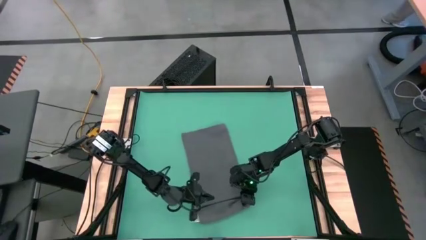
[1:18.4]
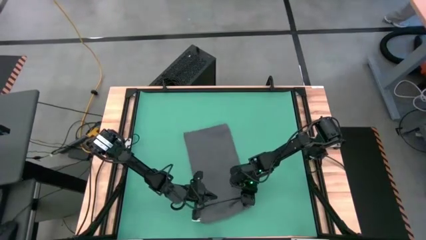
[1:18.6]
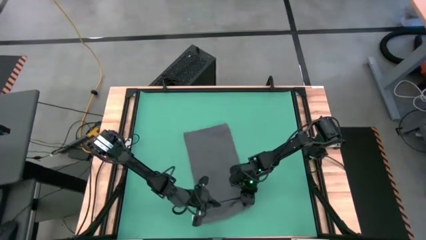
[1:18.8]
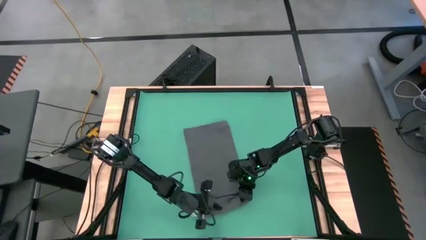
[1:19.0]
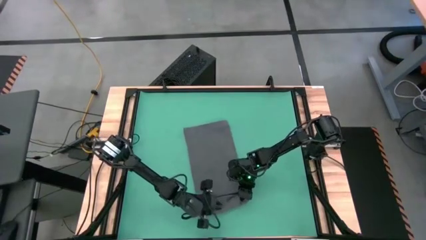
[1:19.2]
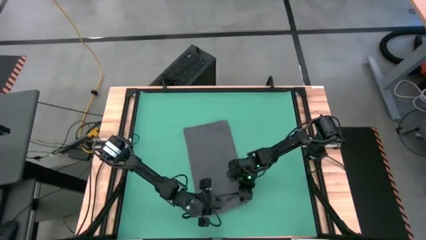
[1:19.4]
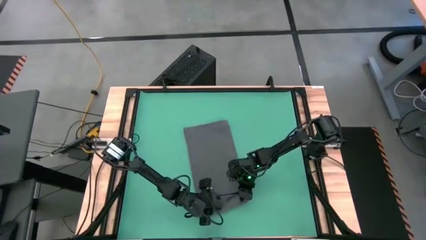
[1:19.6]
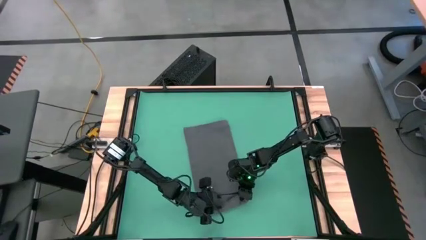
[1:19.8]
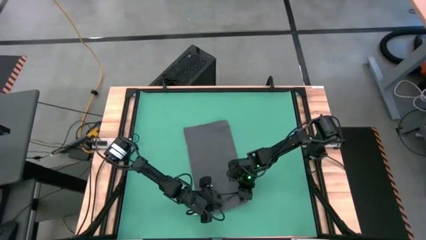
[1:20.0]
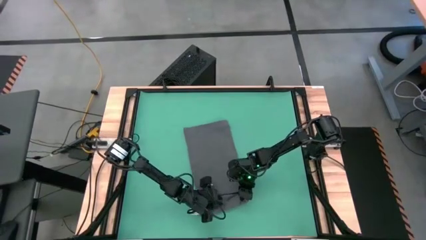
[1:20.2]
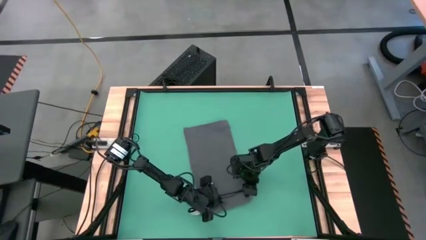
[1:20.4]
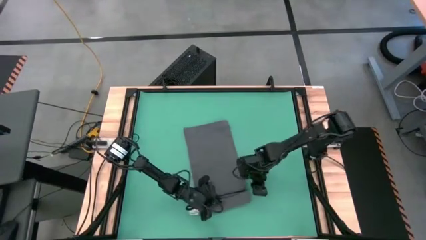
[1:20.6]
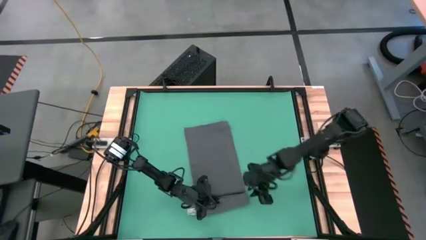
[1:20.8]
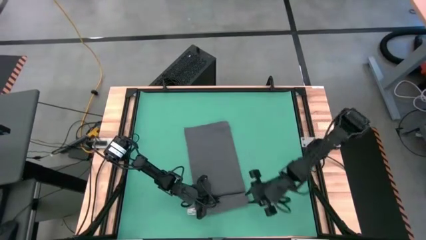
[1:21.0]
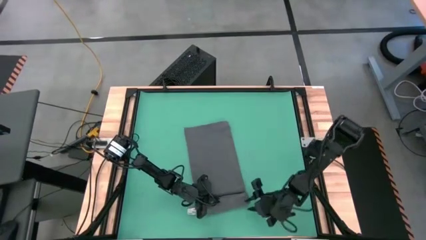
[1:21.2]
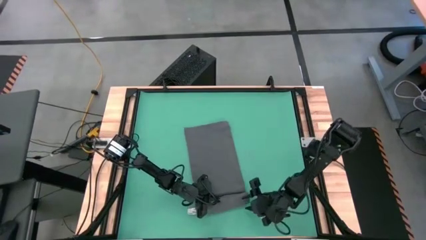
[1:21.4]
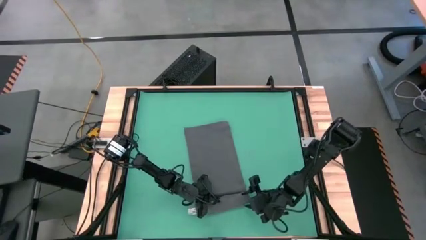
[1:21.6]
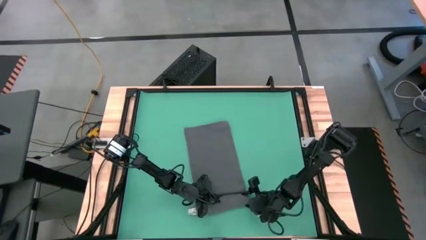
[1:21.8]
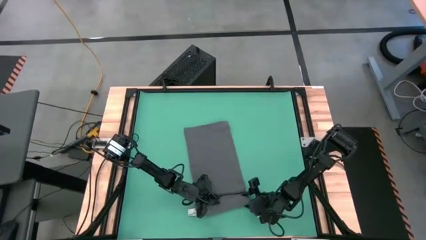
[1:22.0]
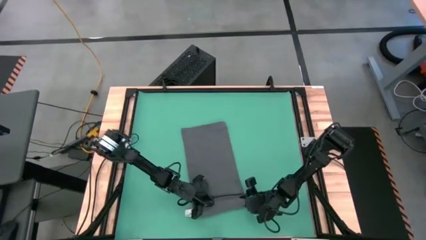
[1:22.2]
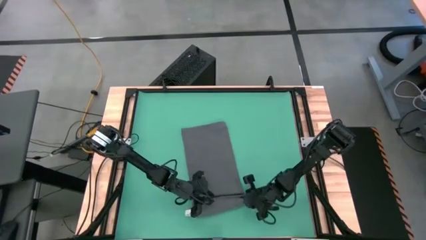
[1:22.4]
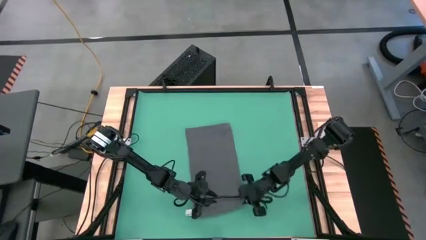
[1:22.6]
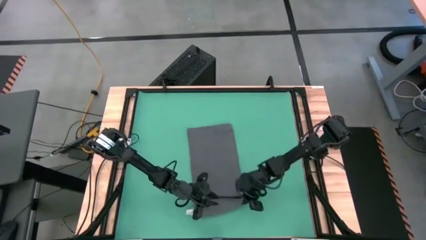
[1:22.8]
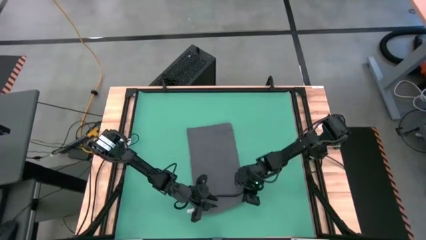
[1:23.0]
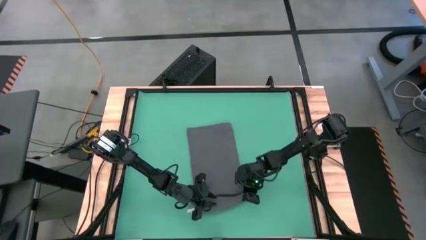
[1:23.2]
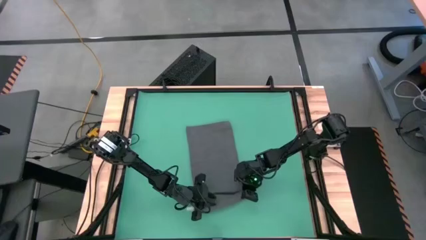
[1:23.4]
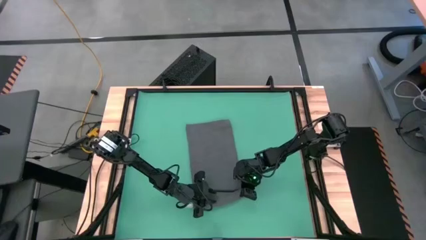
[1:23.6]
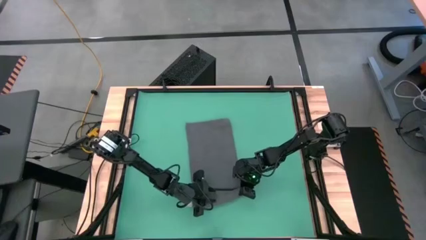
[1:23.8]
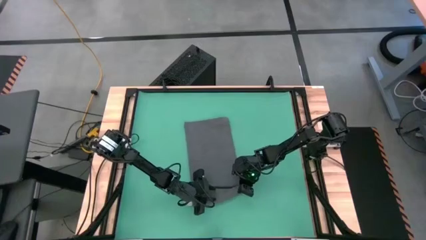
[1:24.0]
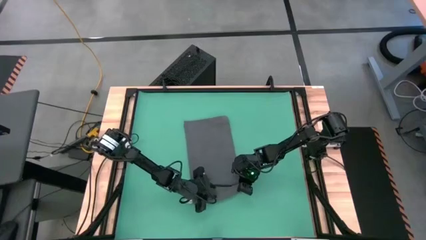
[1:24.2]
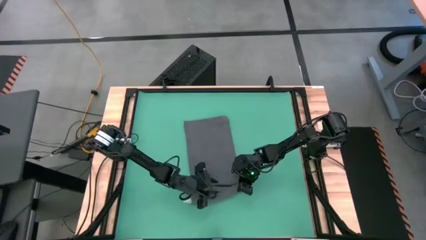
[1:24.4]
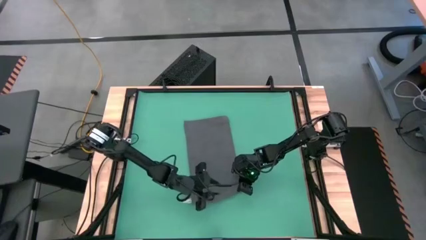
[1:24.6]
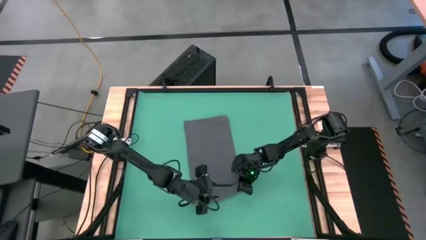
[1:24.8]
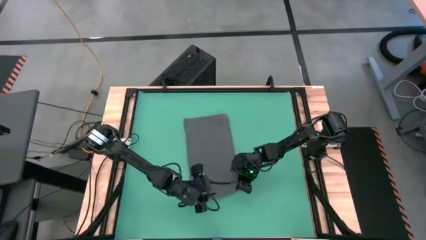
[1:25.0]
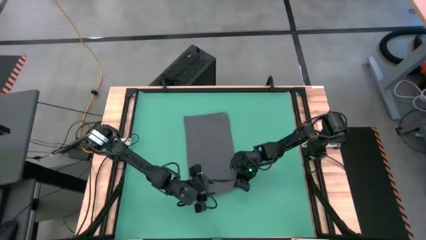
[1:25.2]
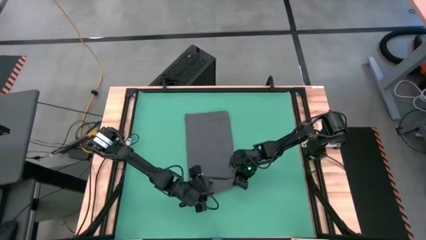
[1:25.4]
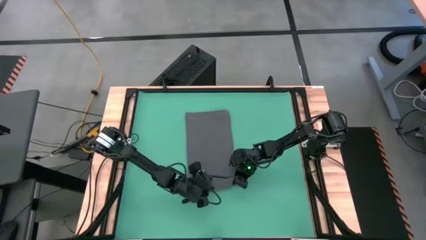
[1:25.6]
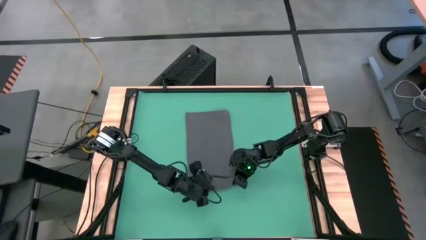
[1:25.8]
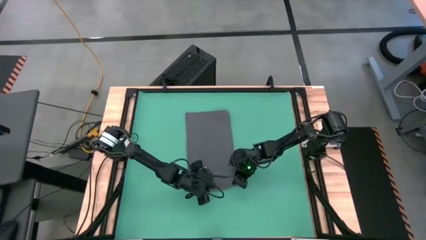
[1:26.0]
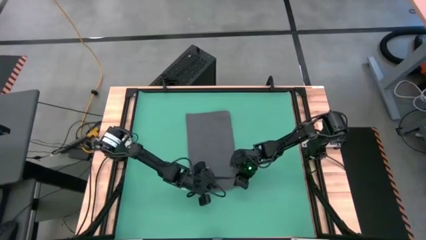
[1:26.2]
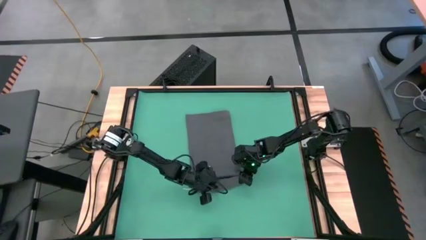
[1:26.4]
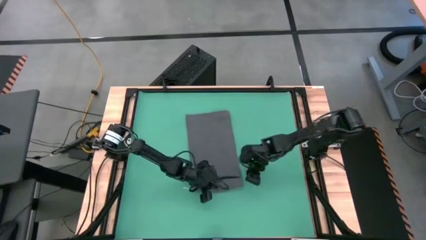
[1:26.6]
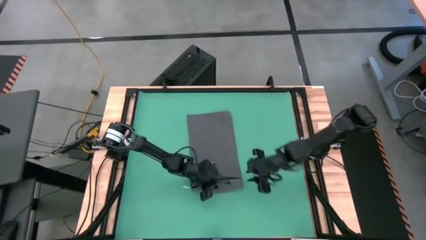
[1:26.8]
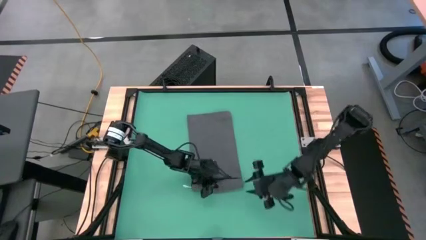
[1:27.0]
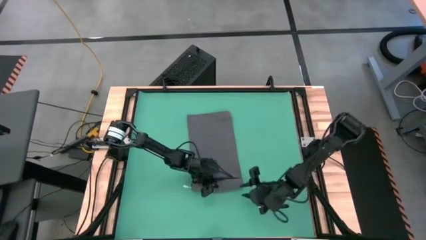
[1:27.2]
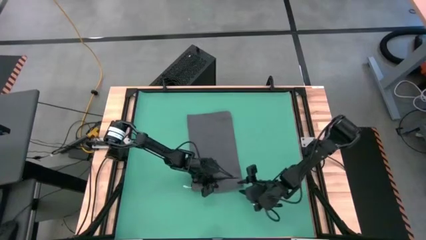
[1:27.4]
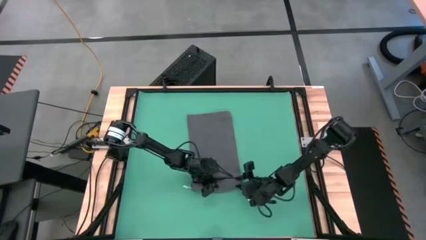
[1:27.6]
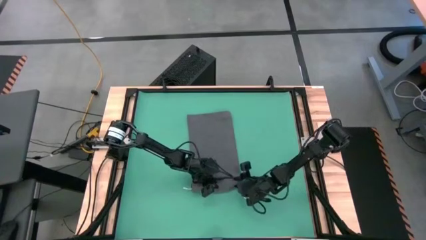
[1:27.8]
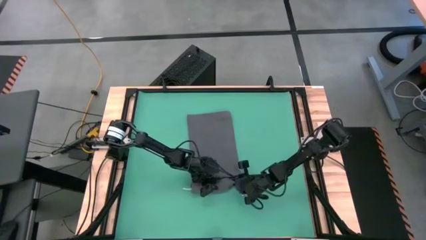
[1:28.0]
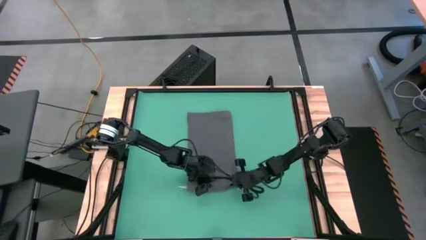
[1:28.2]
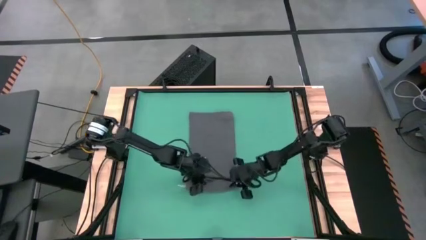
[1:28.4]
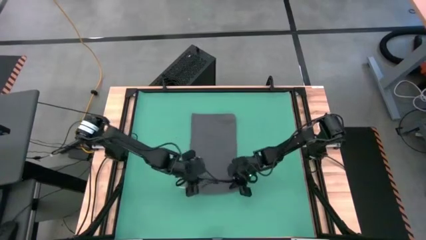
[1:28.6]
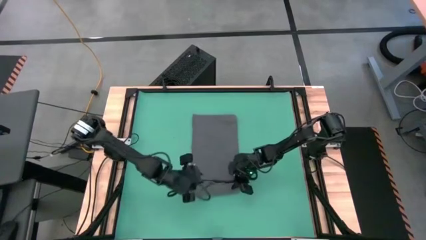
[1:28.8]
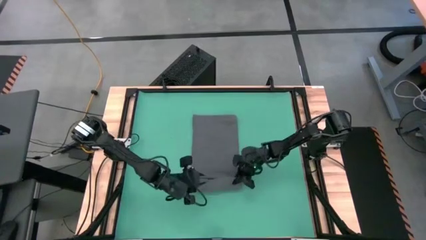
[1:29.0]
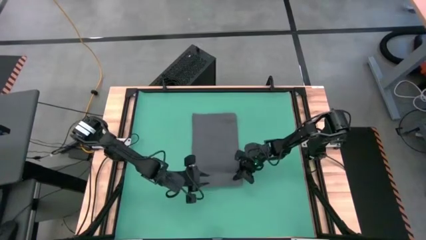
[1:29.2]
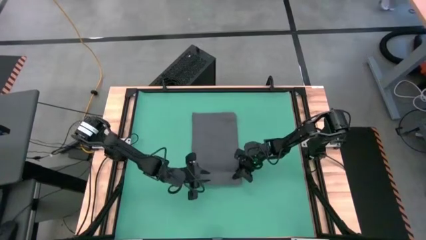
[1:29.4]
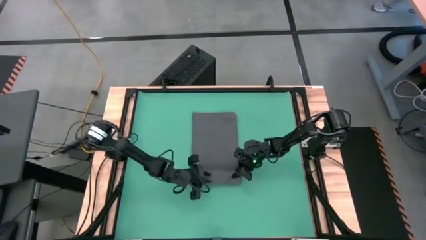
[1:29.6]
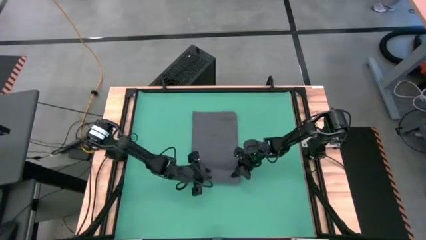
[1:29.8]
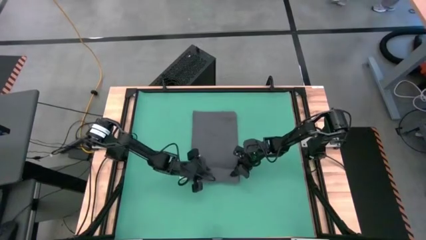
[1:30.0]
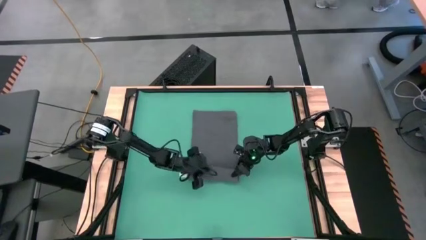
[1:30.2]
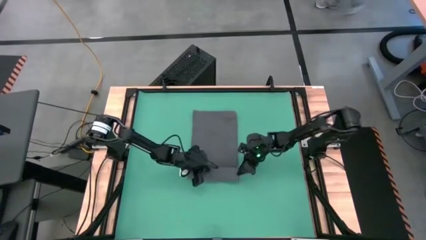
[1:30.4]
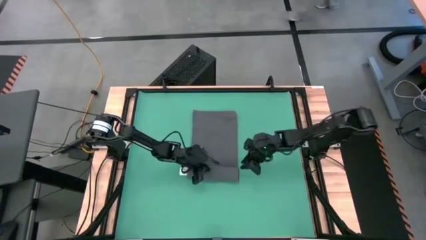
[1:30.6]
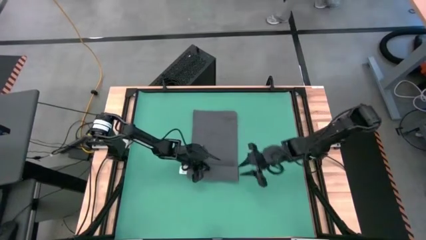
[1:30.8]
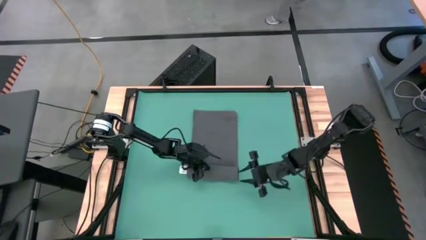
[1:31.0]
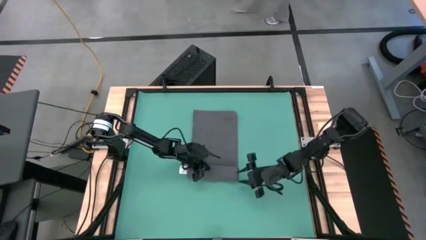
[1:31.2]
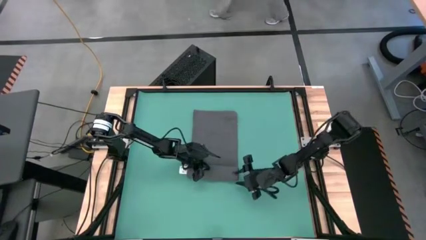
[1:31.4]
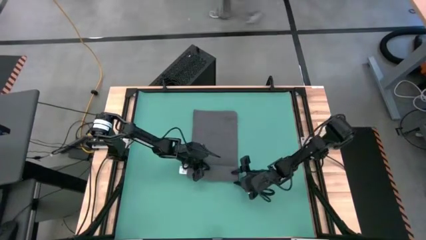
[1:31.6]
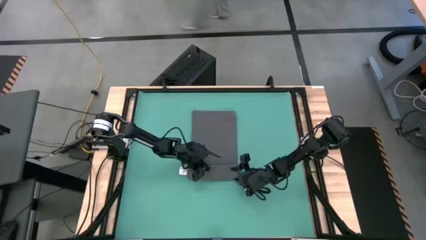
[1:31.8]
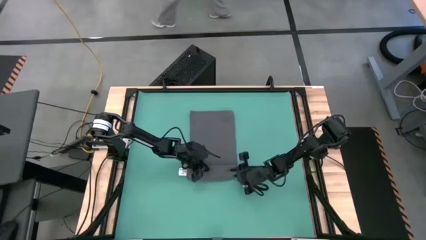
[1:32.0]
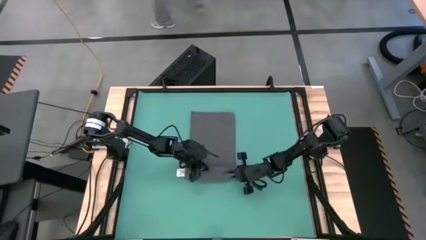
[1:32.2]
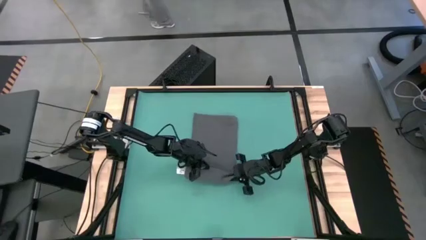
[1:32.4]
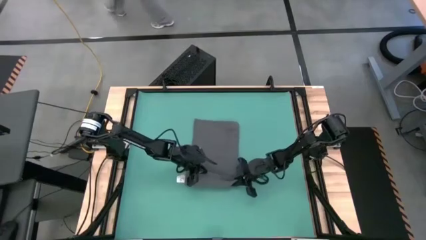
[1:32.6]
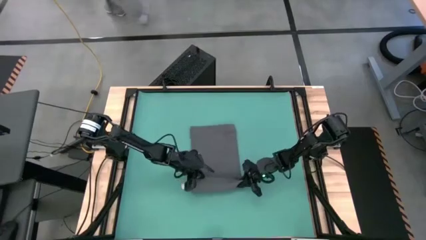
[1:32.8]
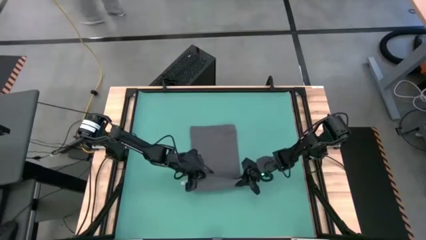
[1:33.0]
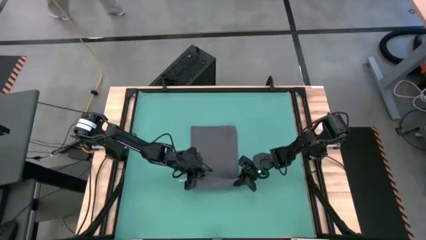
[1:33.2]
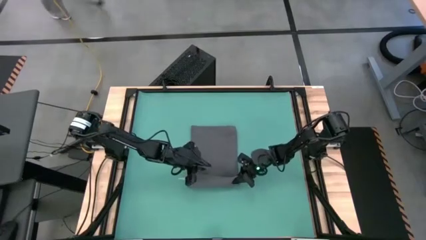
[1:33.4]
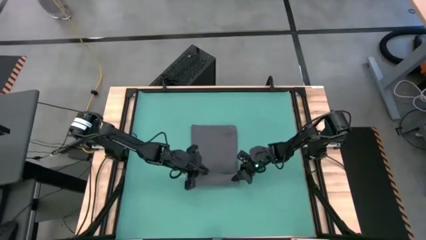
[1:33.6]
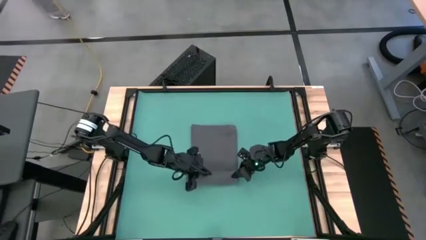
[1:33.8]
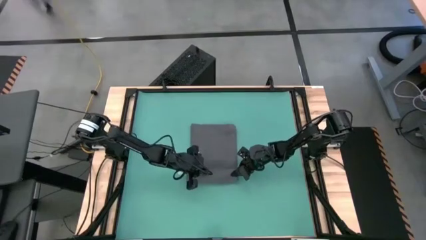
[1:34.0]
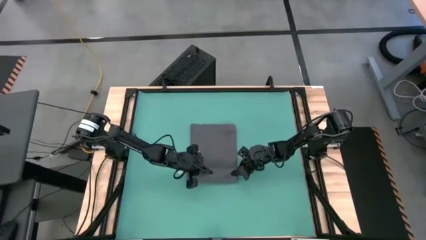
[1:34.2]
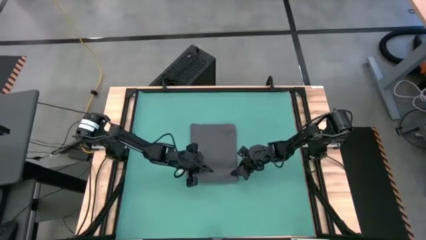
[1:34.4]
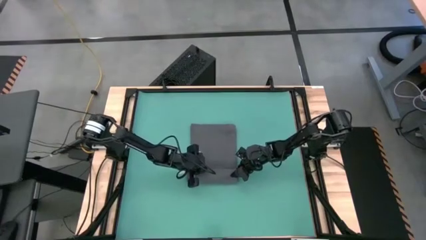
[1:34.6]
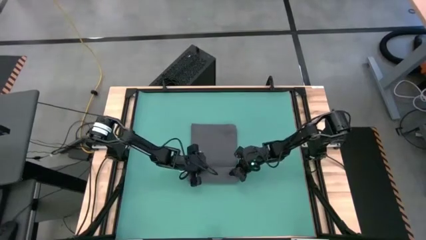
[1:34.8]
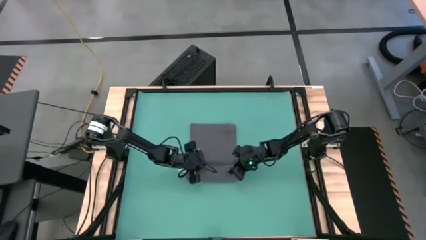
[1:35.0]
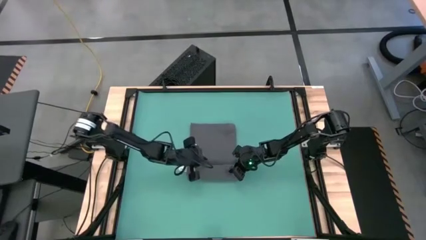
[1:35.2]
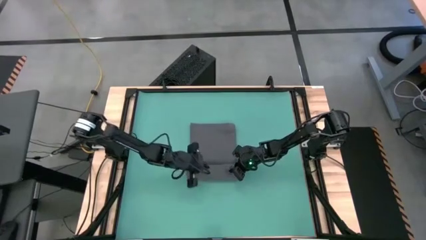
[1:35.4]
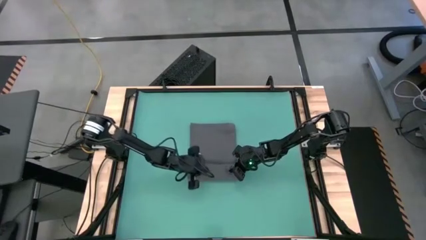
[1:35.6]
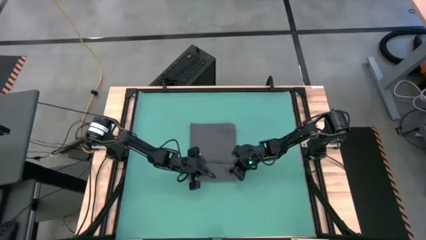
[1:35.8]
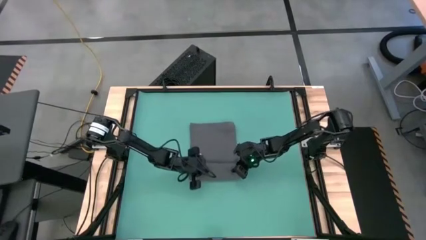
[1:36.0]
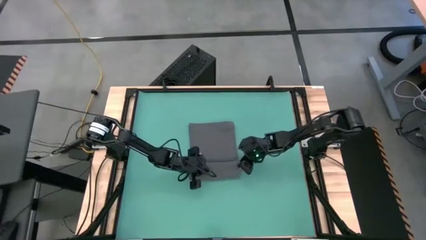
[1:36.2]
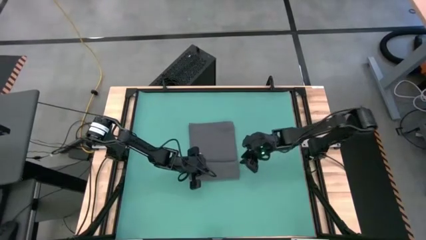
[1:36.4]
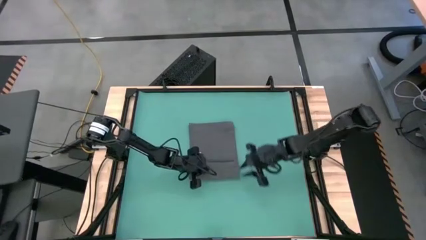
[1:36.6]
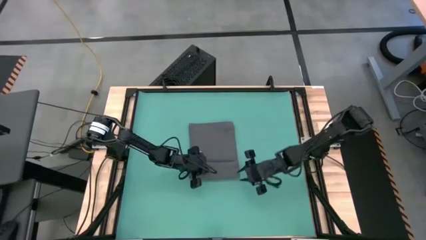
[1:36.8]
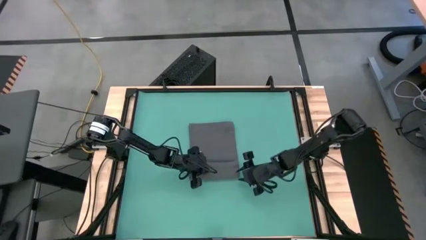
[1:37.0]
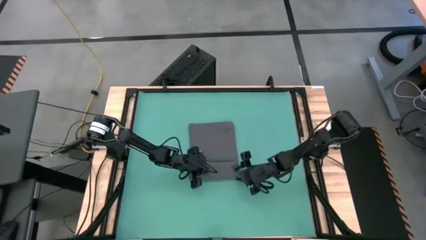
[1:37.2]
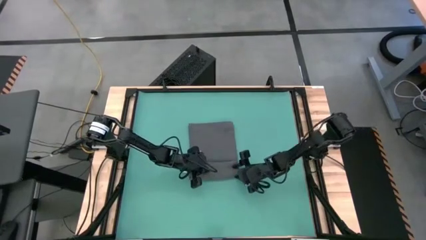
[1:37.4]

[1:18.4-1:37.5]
Task: Roll towel
Roll the gray towel
